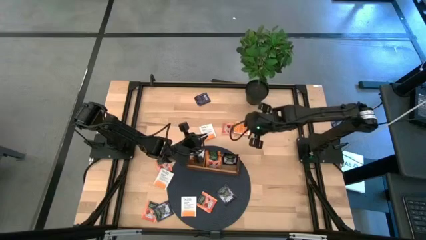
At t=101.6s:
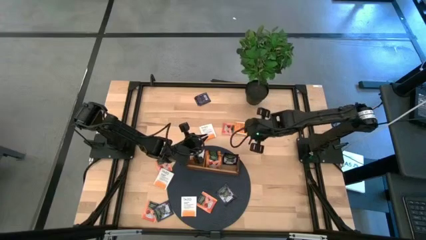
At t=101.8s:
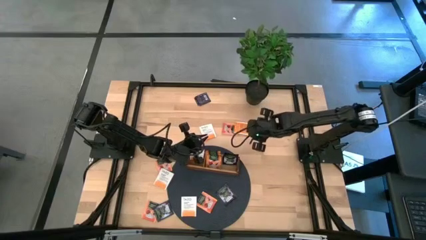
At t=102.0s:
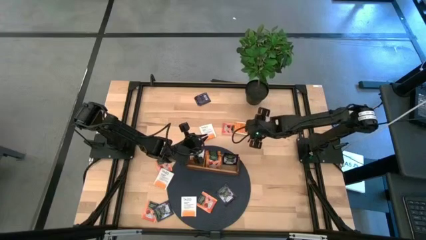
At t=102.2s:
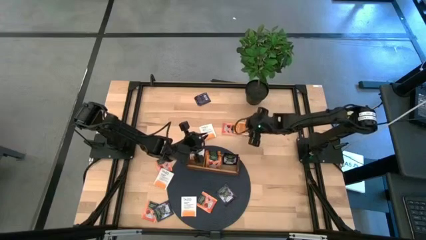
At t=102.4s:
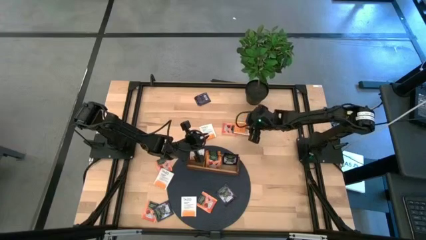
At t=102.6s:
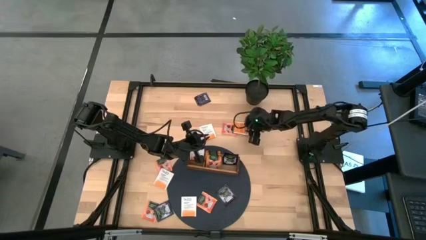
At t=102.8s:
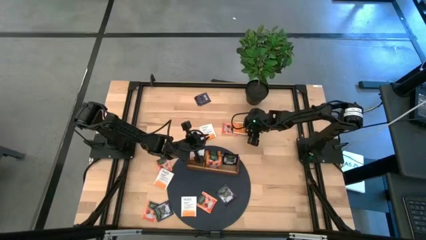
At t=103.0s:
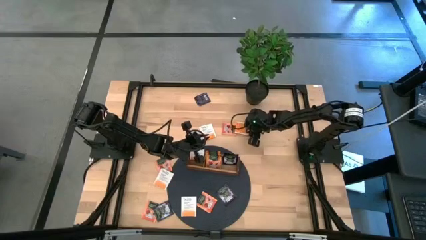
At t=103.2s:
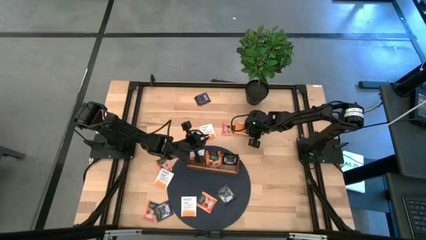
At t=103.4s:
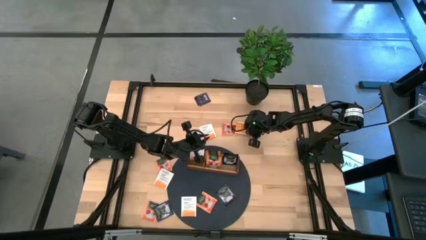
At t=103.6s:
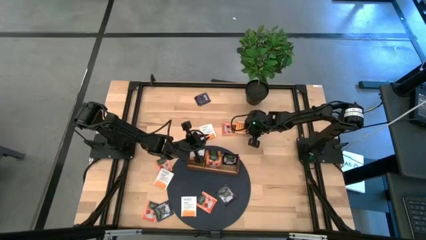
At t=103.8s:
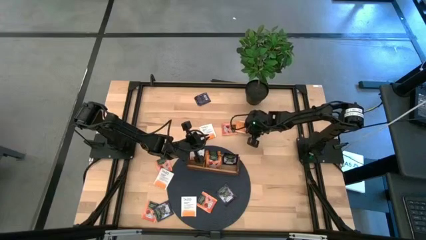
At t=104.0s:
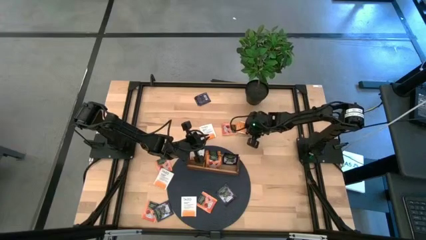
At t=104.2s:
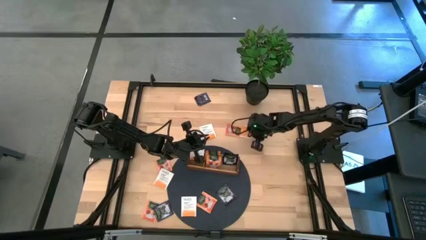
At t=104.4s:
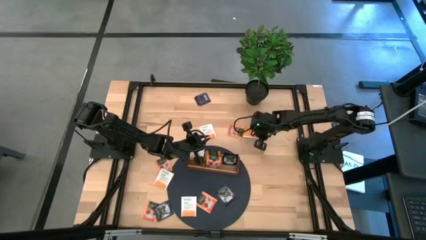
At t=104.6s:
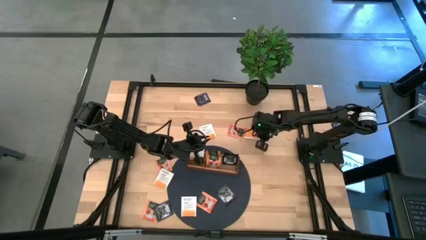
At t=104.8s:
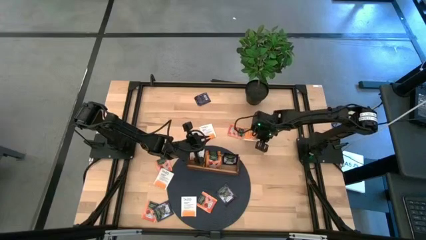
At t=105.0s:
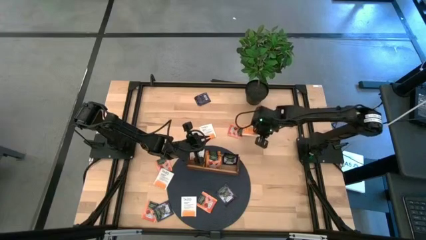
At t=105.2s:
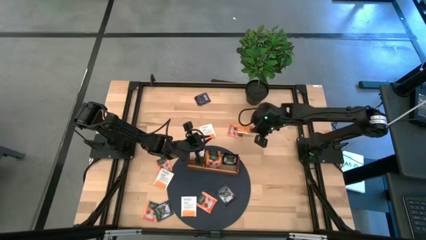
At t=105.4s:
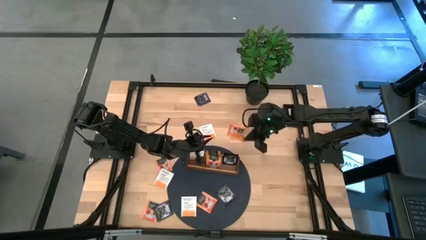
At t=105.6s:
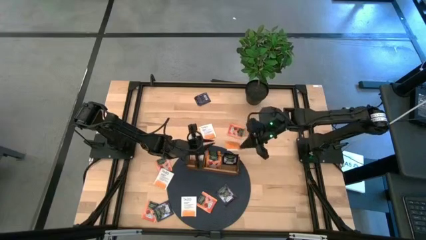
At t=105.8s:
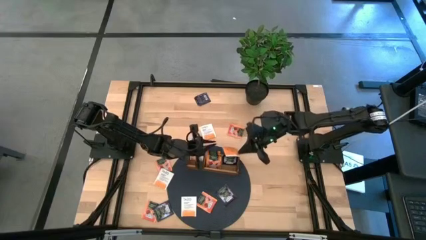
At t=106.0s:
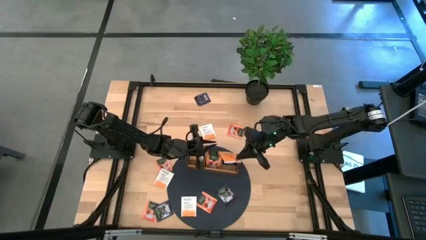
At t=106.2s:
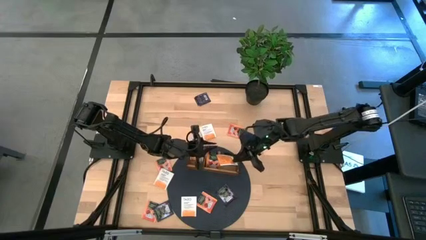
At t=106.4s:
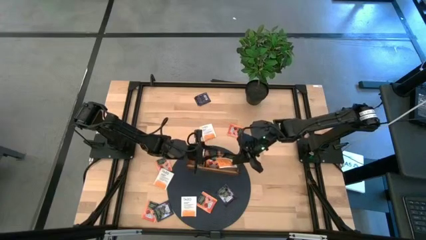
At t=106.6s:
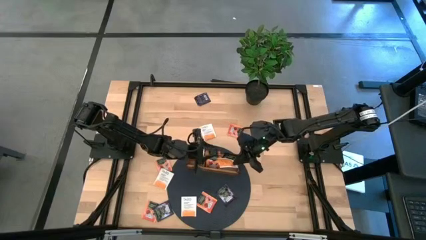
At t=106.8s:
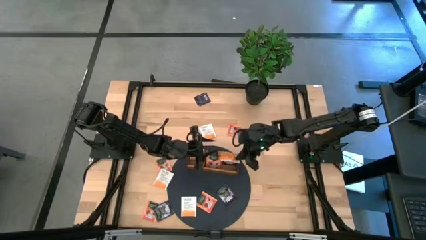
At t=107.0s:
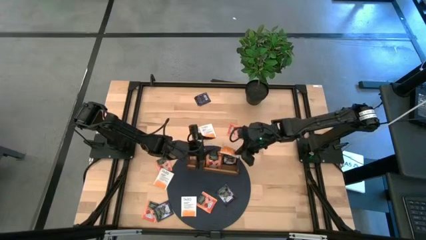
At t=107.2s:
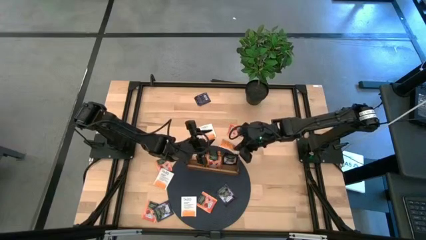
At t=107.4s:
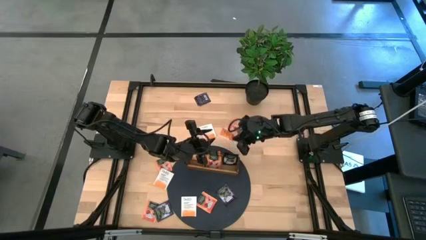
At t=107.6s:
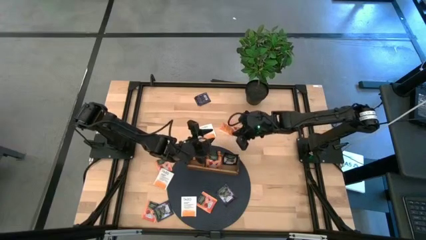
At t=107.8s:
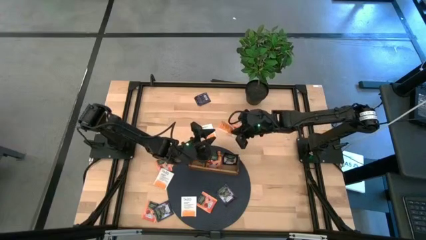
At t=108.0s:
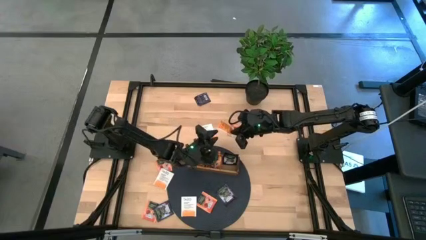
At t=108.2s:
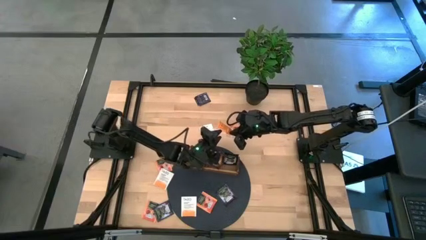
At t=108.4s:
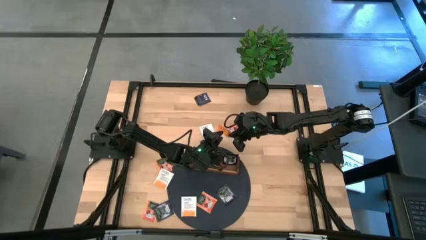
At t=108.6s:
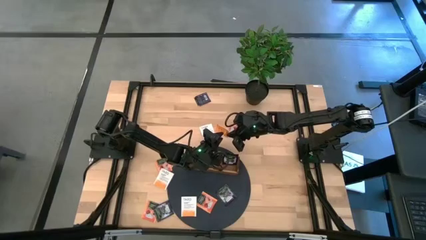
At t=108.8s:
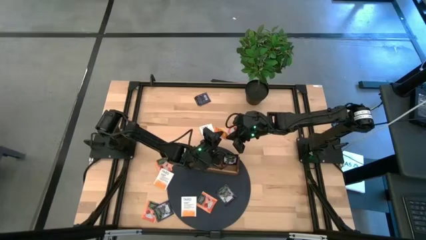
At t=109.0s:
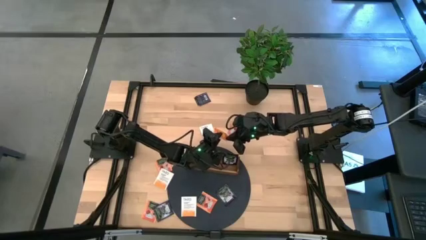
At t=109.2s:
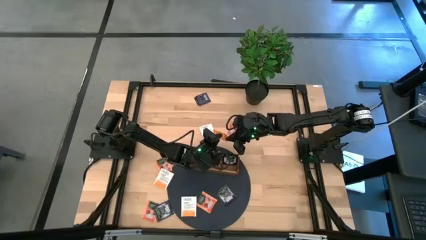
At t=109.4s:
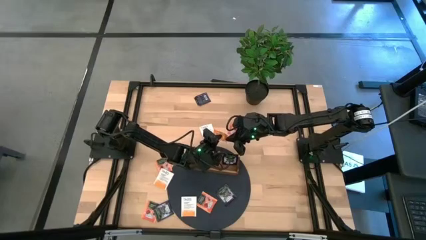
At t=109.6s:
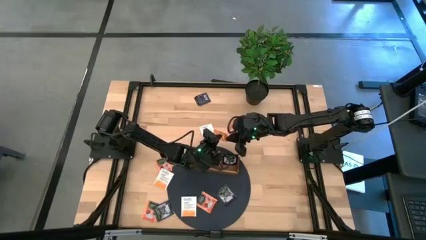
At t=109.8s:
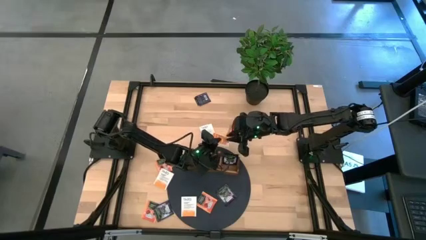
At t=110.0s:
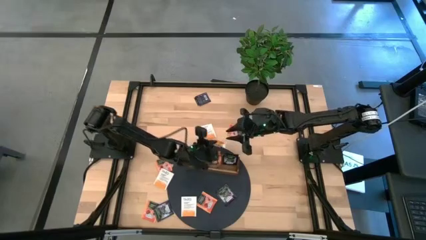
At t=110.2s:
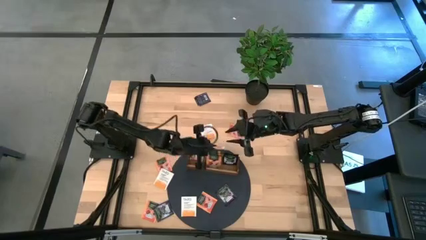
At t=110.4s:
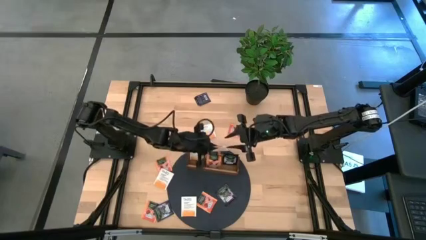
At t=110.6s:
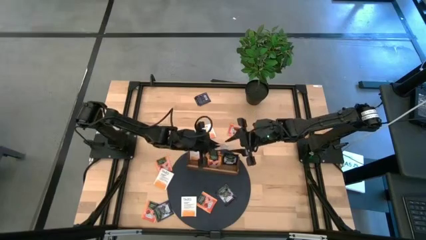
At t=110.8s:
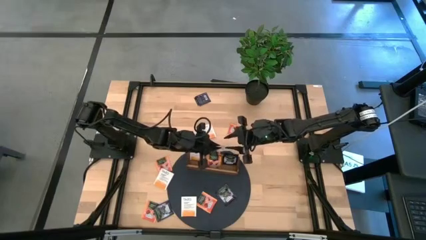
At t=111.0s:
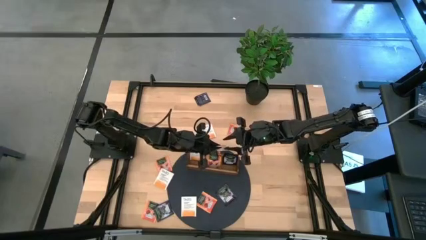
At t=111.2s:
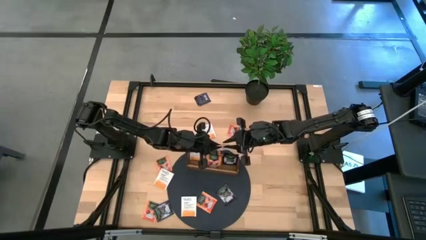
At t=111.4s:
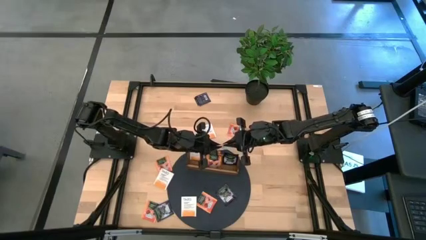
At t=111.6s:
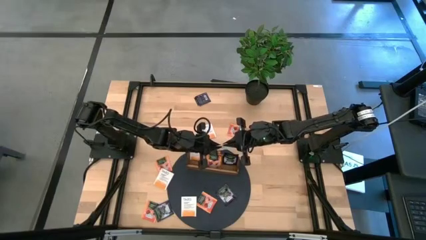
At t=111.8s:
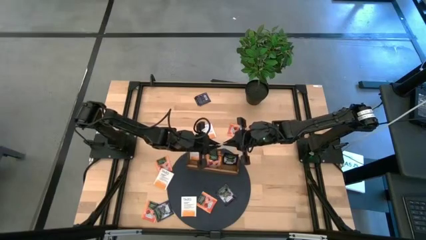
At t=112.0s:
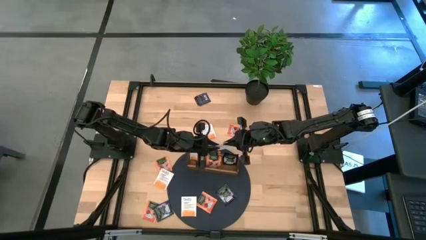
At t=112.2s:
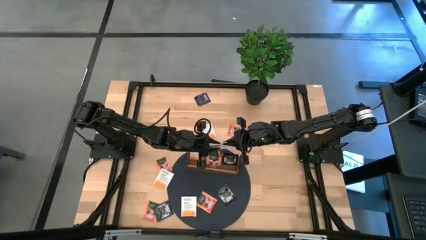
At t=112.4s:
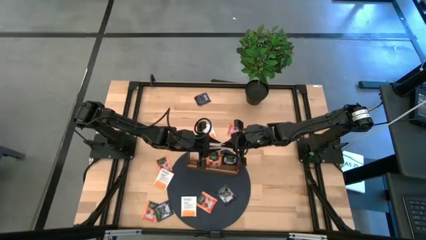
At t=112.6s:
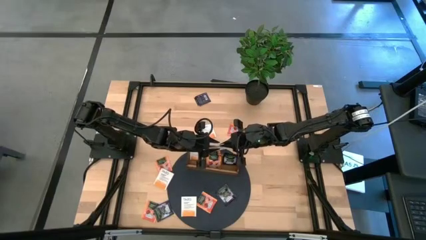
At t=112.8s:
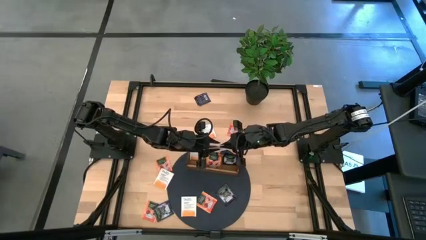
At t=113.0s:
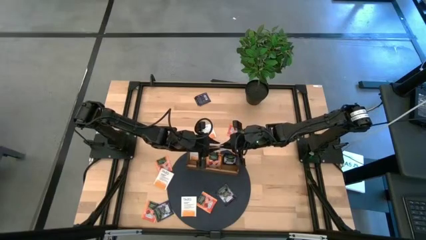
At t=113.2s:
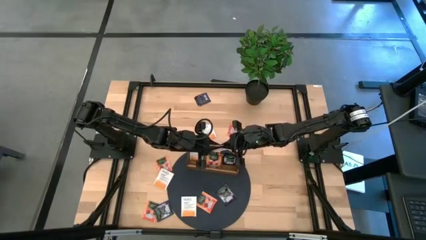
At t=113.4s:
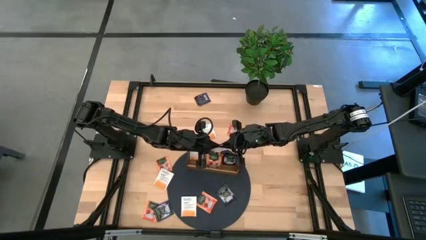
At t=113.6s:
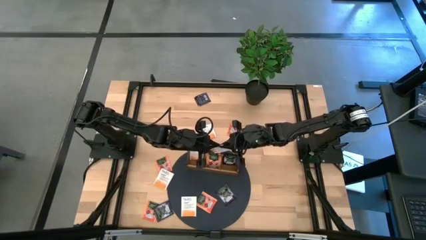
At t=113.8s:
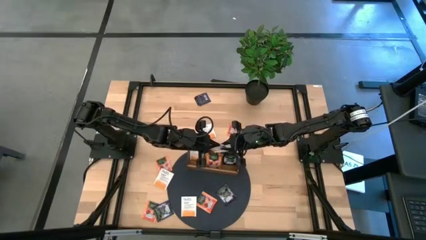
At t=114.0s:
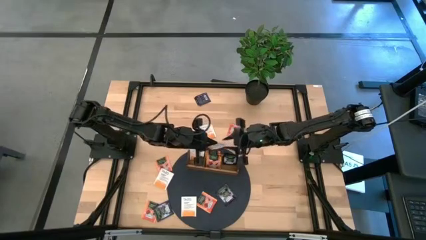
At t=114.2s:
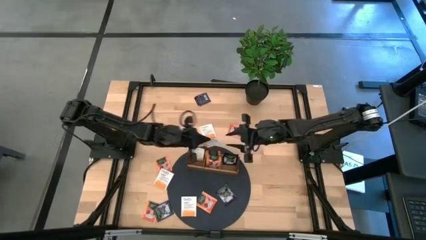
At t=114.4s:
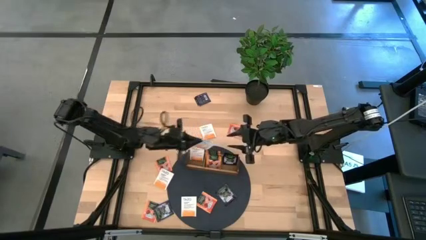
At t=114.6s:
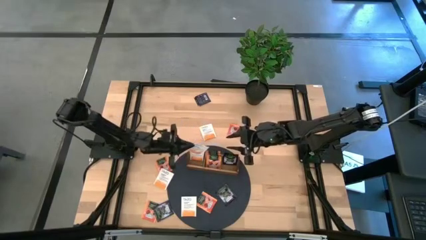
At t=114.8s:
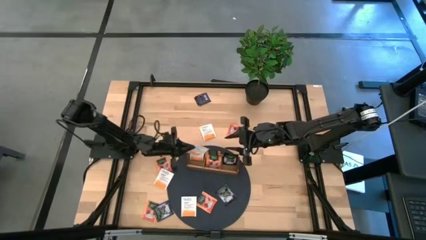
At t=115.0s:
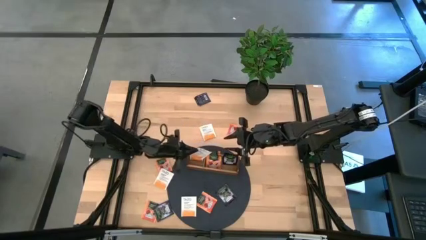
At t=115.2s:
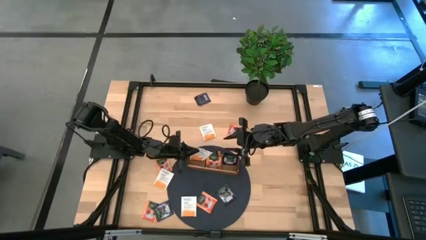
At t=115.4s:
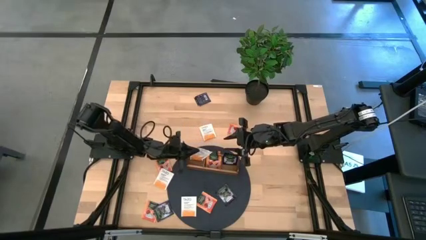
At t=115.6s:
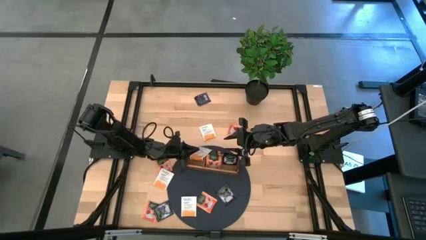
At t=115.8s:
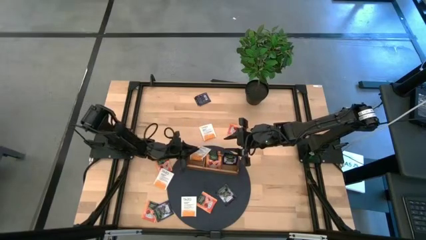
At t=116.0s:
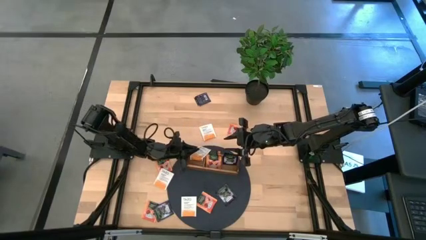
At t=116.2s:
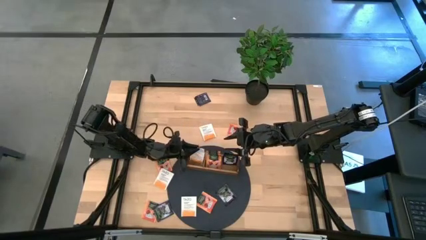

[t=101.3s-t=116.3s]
Task: Pick & Place Tea
Put the white orange tea bag into the left section of the wooden organizer

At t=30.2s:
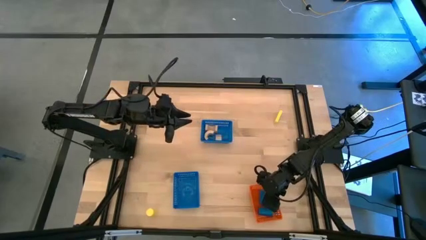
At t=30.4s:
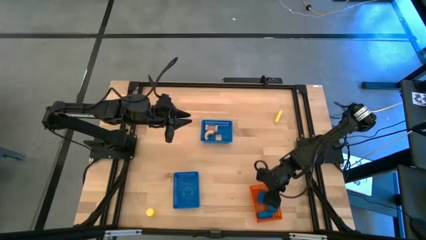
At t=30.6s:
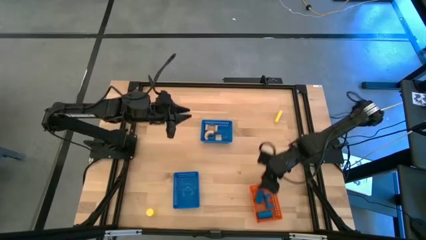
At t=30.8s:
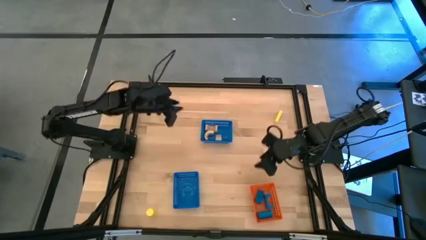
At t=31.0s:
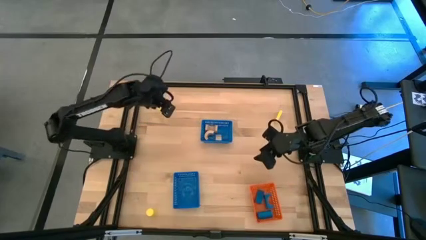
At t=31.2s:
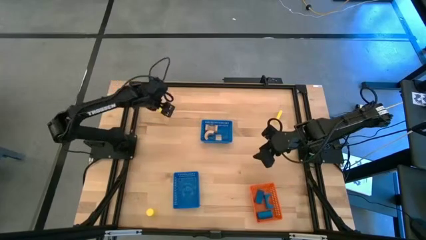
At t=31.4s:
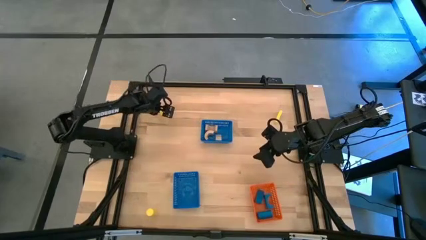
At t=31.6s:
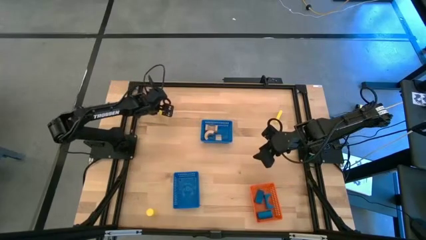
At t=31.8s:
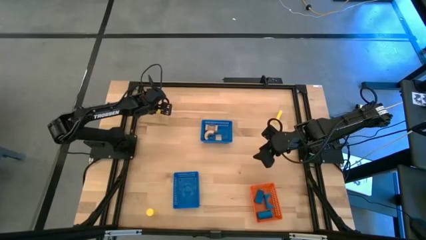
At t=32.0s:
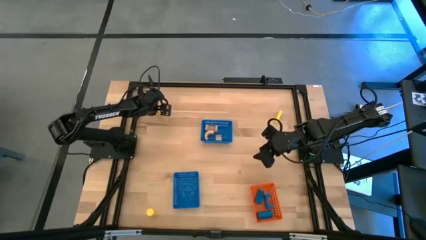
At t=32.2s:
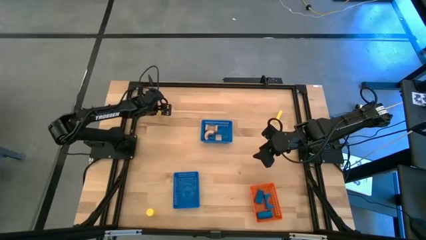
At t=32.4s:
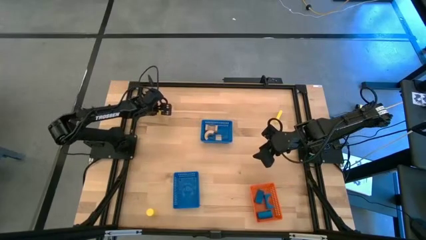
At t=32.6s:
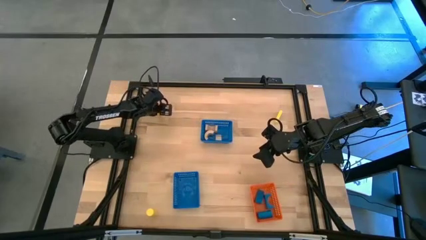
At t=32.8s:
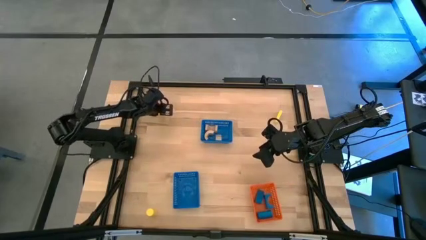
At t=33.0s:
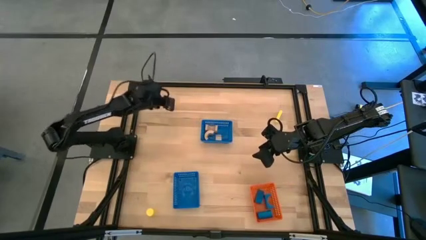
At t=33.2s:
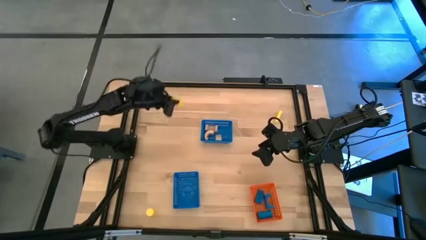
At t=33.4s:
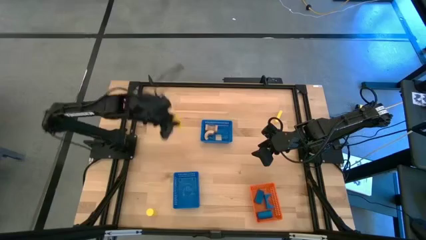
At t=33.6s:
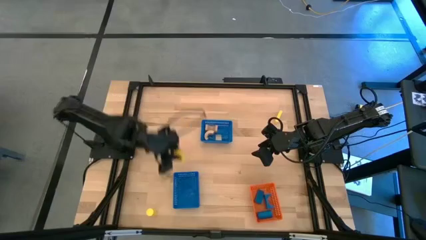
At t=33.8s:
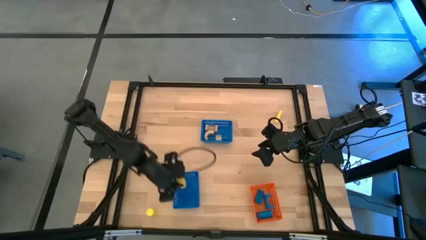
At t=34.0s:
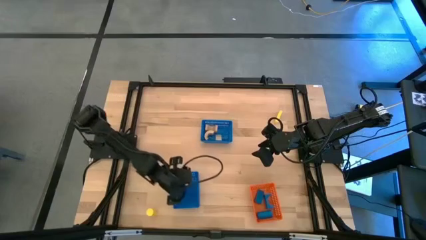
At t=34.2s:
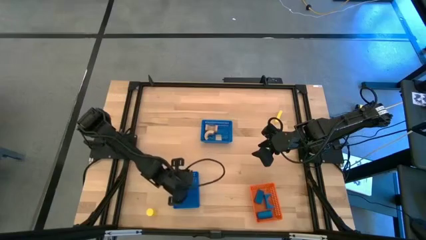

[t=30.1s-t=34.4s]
Task: Sort & place blocks by color
Put the top left yellow block into the bottom blue basket
